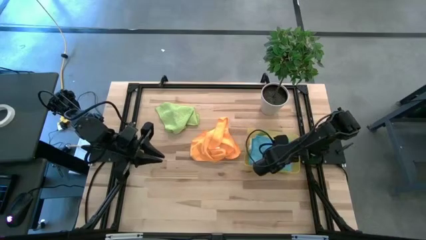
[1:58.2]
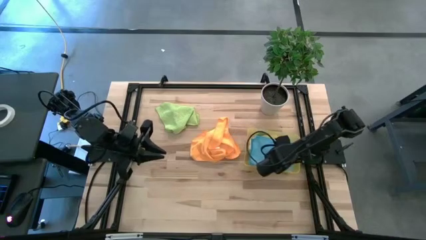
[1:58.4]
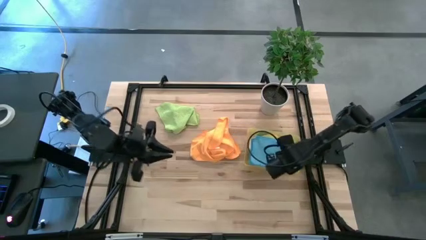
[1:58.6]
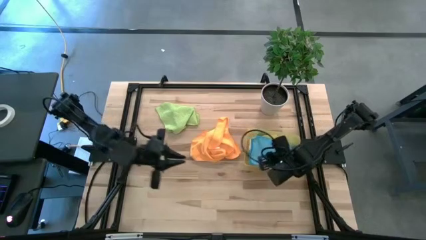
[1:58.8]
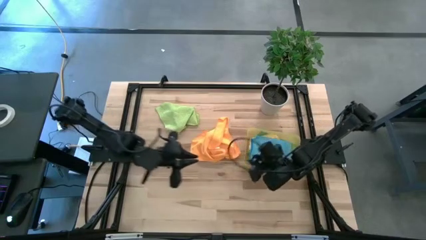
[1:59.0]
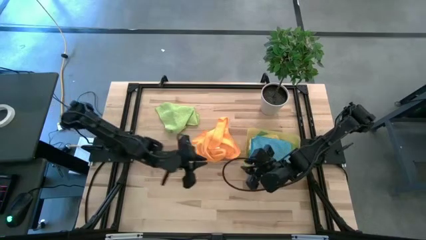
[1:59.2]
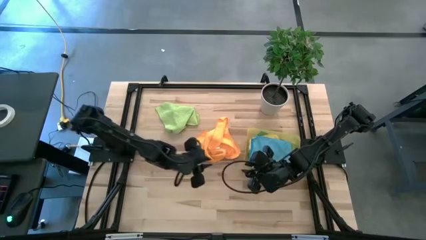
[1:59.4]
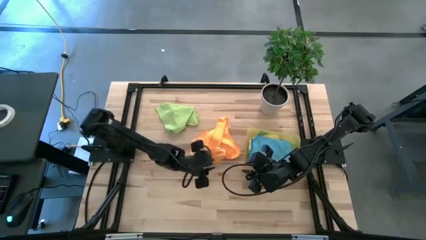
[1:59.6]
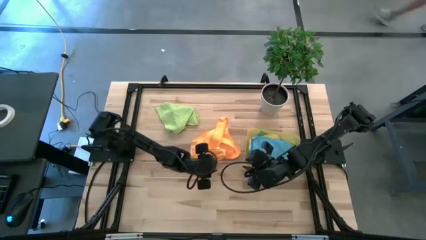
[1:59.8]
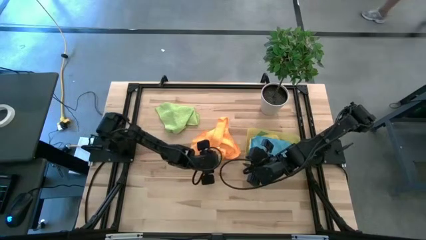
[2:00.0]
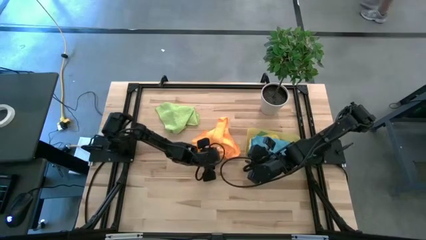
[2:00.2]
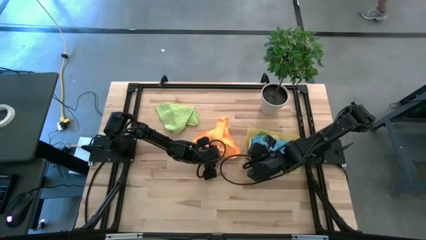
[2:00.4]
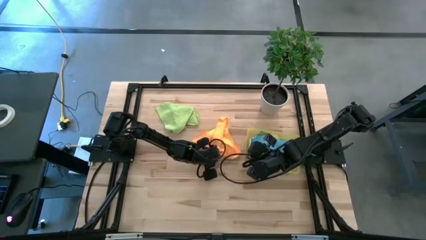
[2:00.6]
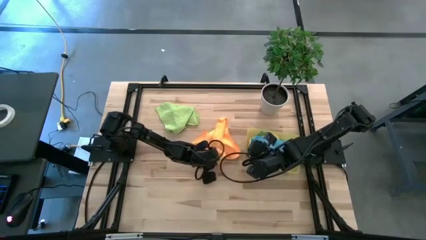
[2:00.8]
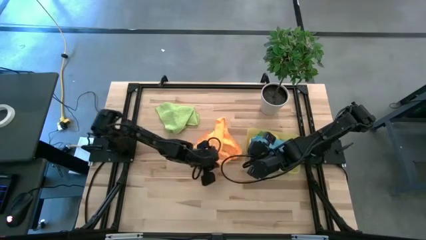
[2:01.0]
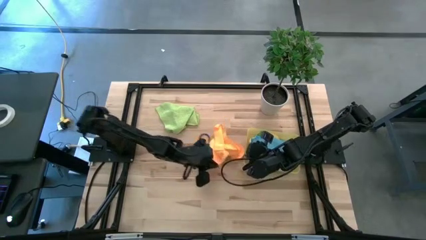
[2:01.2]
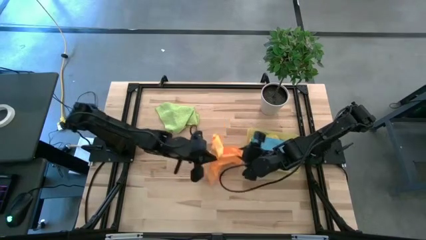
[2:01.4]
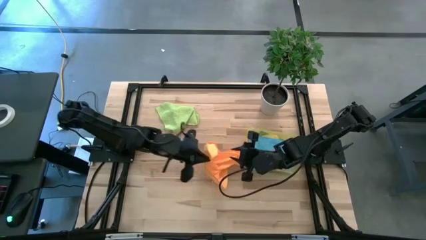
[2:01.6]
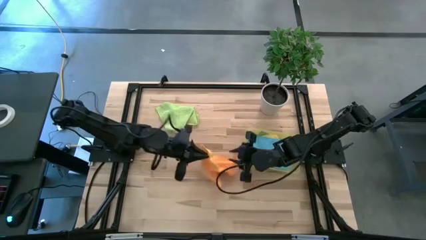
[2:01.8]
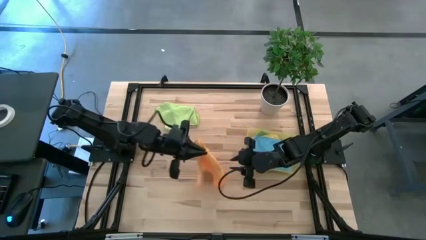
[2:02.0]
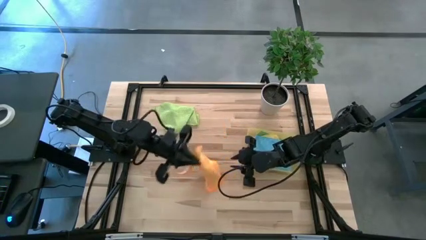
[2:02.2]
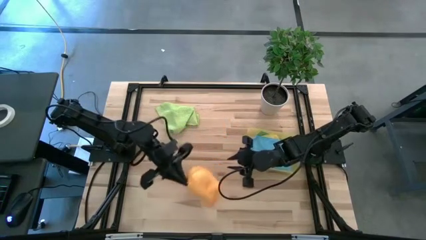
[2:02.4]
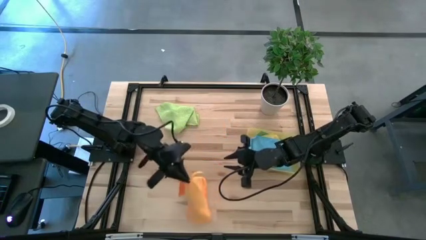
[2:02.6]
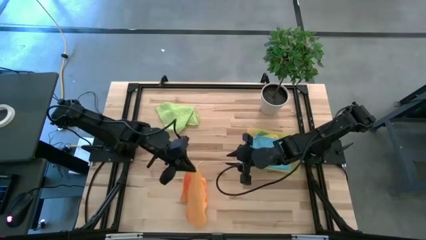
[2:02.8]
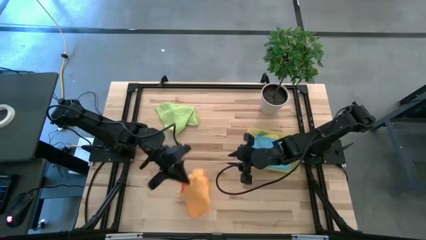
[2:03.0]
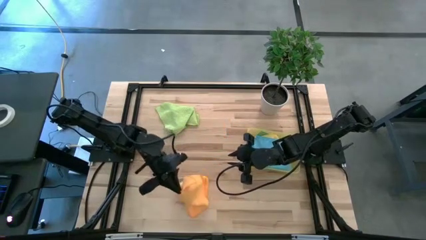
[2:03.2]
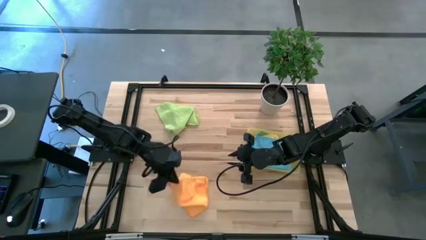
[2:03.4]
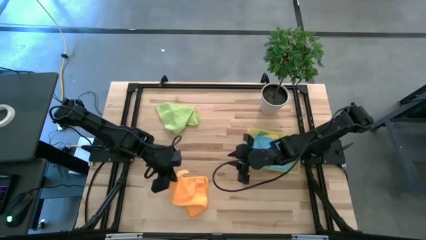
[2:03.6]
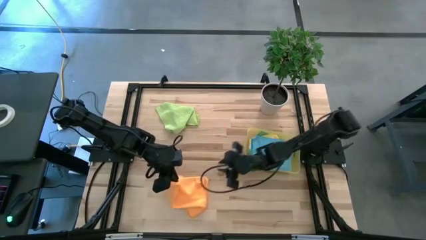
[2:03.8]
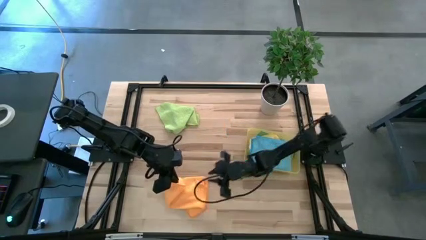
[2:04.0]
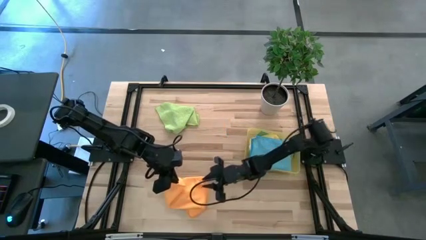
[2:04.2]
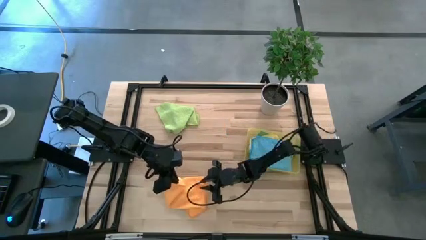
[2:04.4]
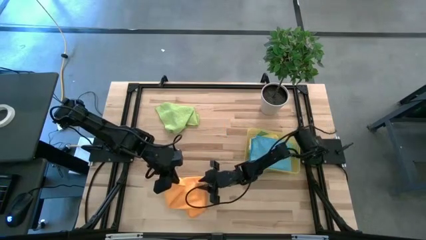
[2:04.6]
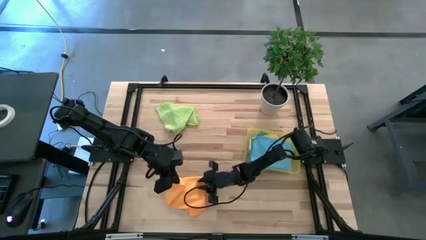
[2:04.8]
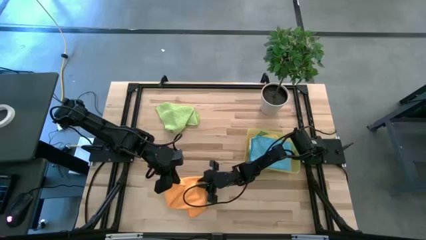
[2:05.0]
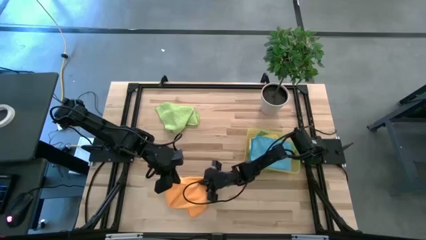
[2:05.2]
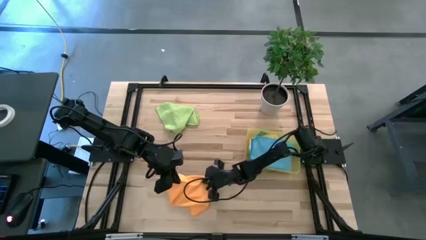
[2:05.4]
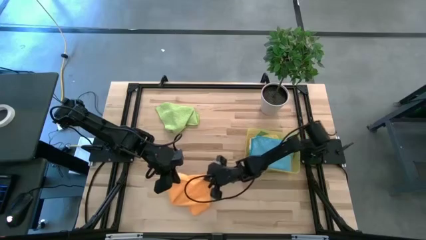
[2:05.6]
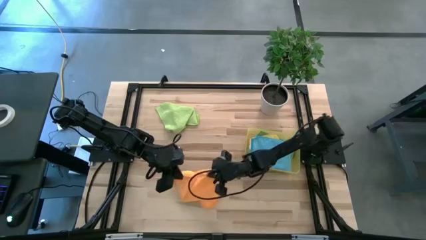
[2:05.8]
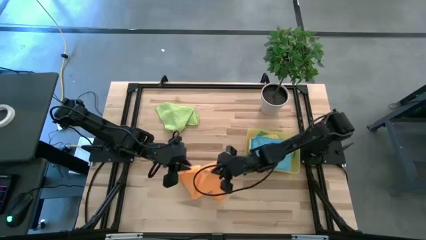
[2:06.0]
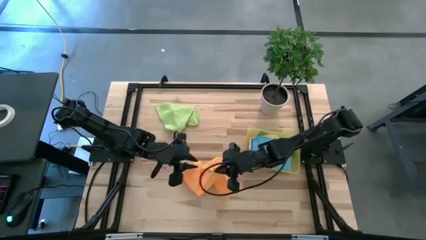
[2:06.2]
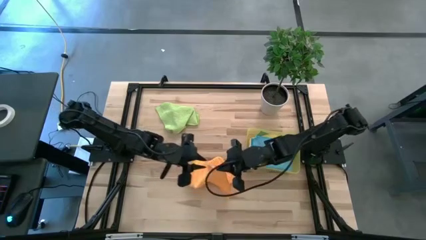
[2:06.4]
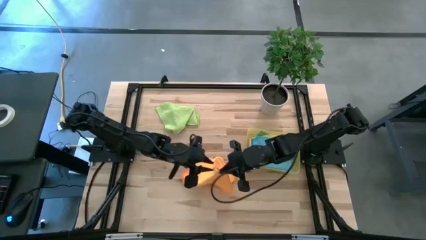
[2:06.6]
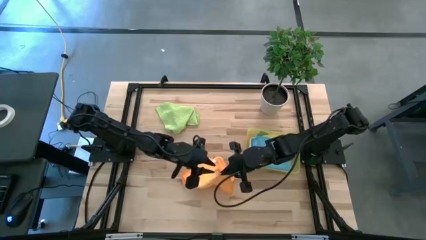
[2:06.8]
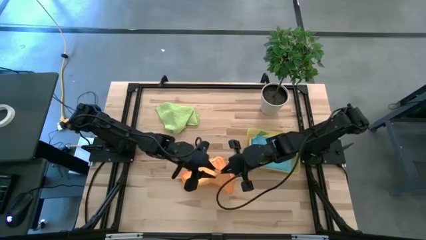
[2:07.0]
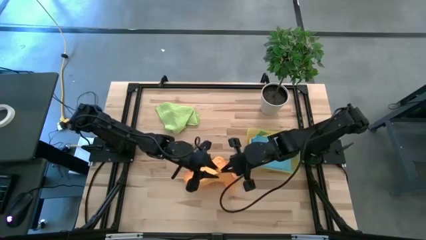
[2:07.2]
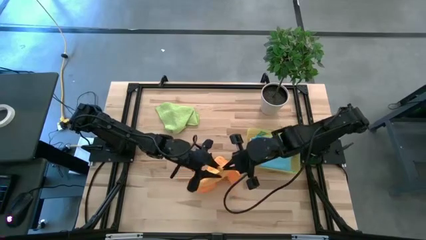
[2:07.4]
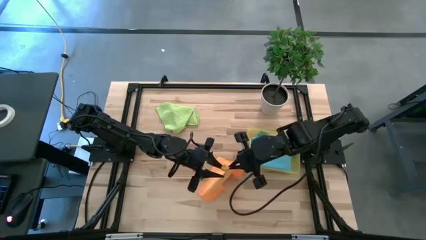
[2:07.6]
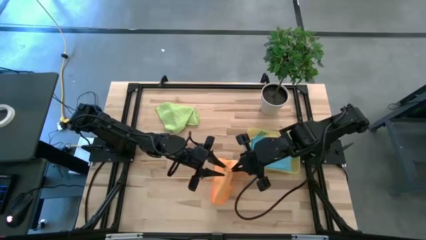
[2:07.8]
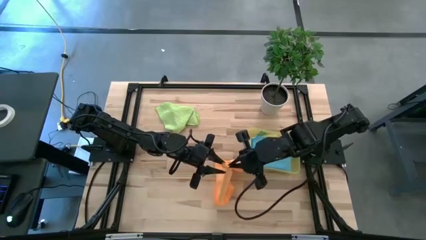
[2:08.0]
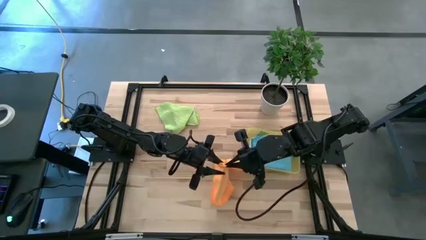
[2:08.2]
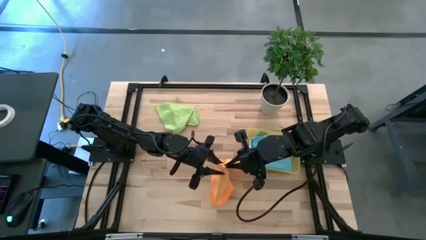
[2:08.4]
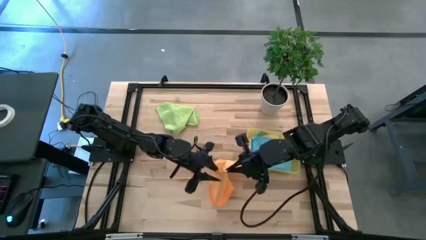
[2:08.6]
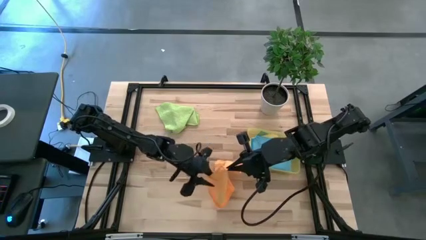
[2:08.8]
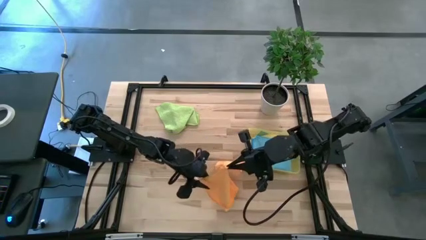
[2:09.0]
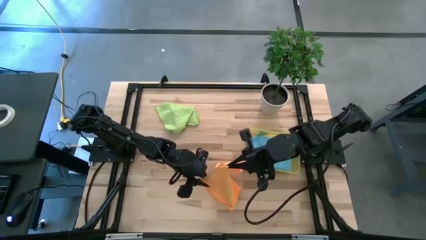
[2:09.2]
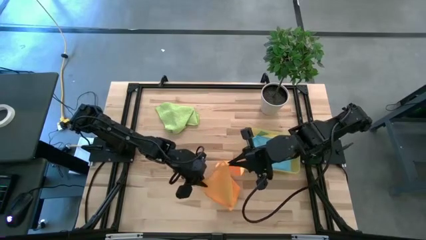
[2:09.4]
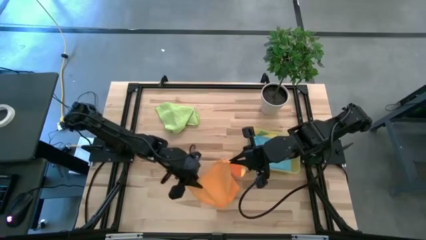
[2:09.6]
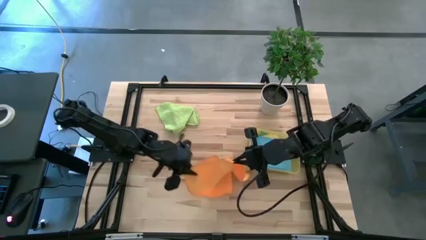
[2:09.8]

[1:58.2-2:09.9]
Task: Fold microfiber towels
Fold the orange microfiber cloth

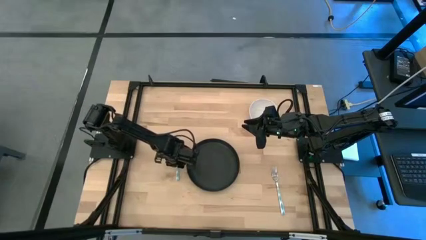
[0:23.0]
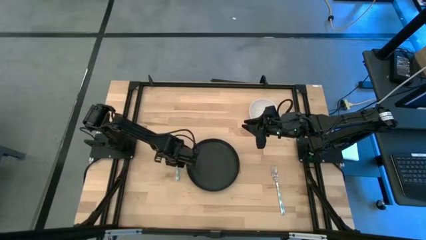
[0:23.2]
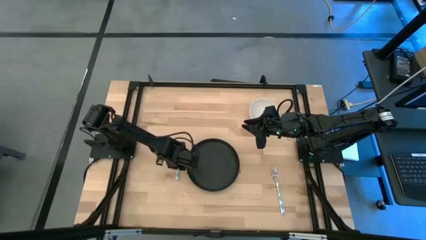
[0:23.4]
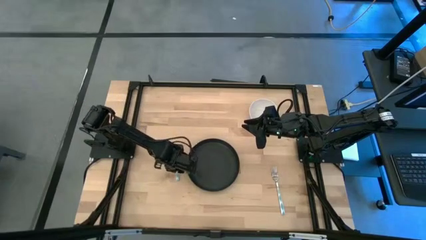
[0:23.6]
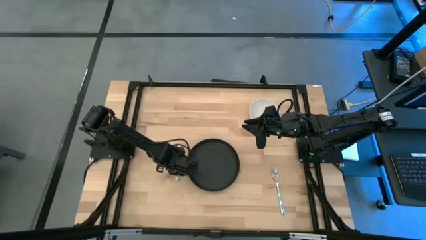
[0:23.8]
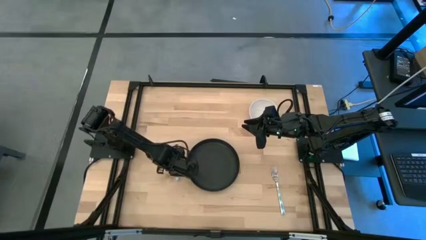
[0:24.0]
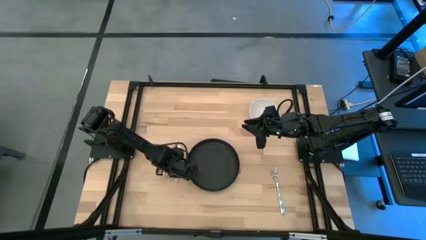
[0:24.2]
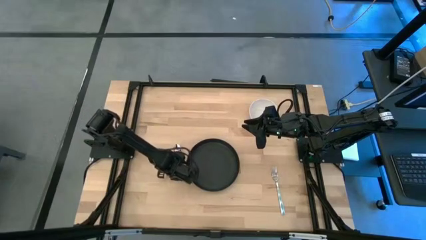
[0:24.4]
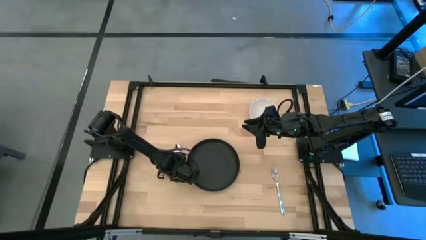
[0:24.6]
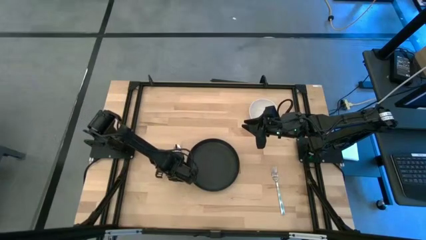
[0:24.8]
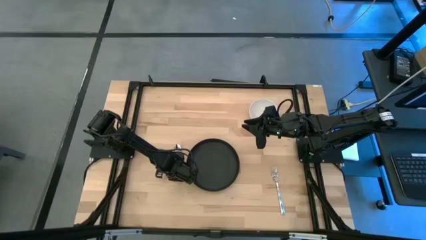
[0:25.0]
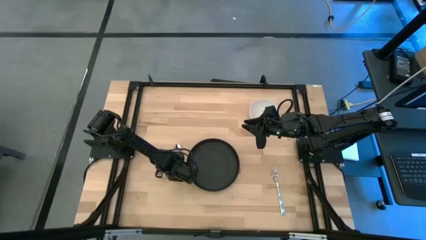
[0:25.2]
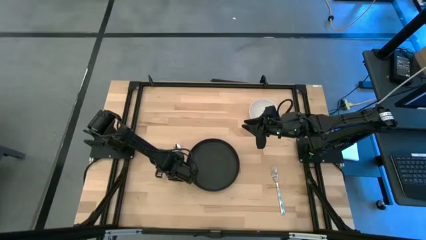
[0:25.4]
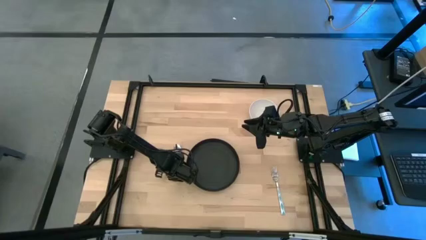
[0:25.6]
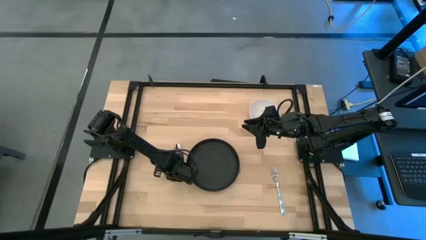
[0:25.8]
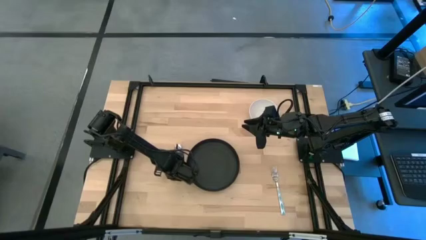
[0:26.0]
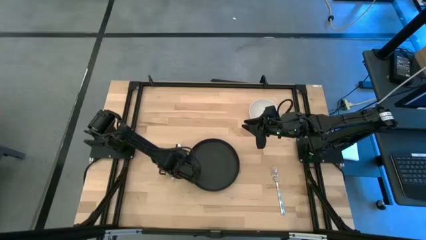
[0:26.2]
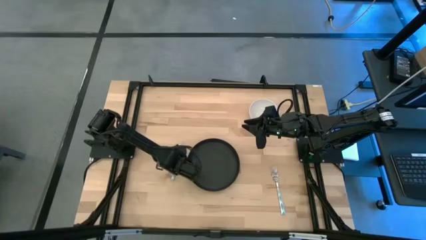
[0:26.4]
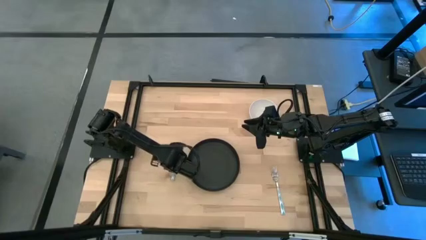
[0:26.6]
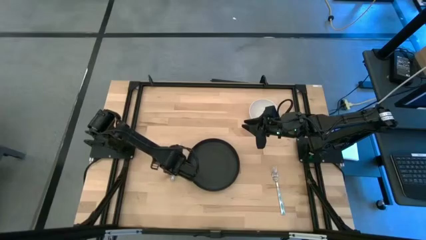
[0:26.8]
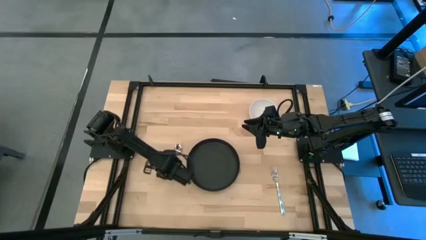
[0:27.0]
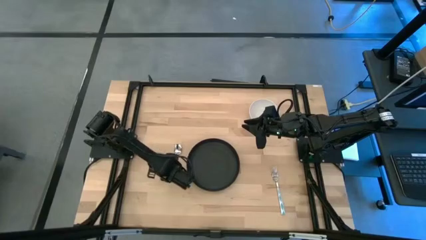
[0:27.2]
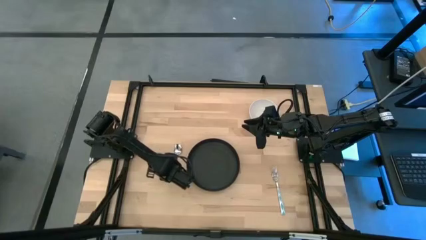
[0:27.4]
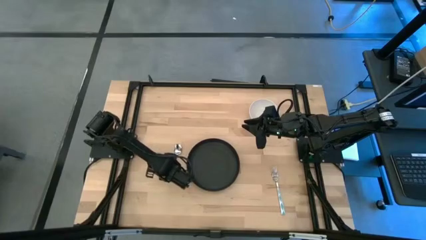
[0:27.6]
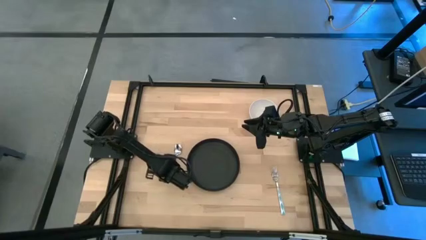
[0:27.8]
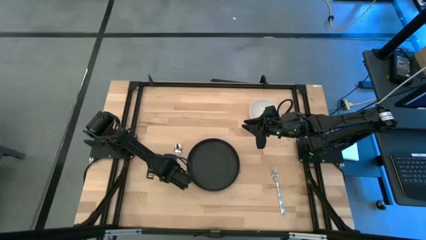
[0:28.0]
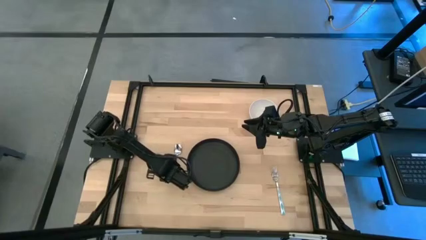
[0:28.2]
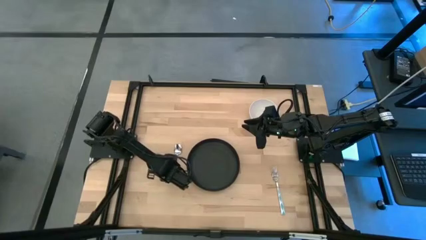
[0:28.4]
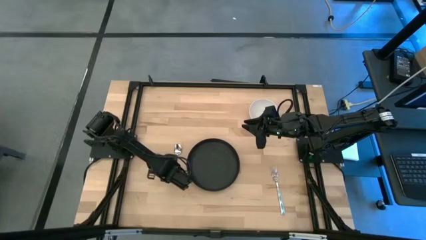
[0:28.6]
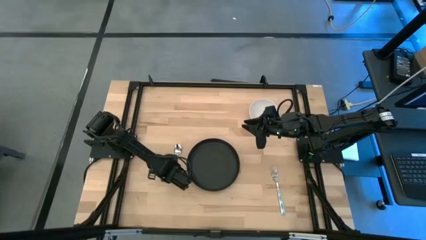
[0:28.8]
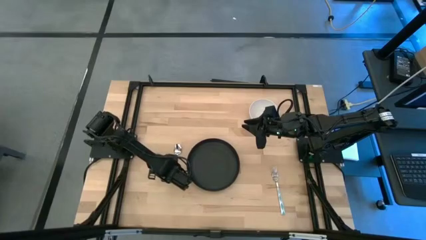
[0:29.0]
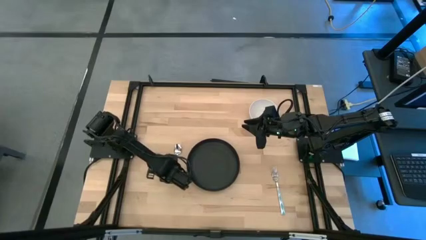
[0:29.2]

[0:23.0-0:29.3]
Task: Set table place
Adjust the green spoon
